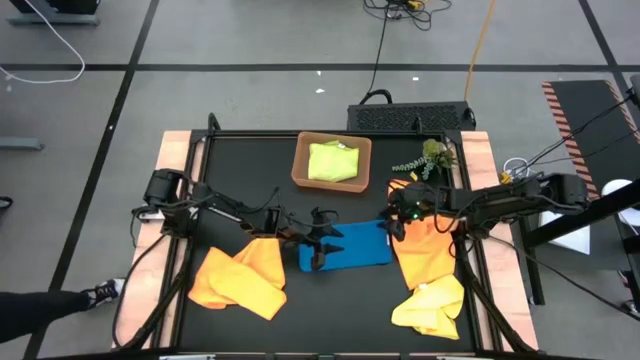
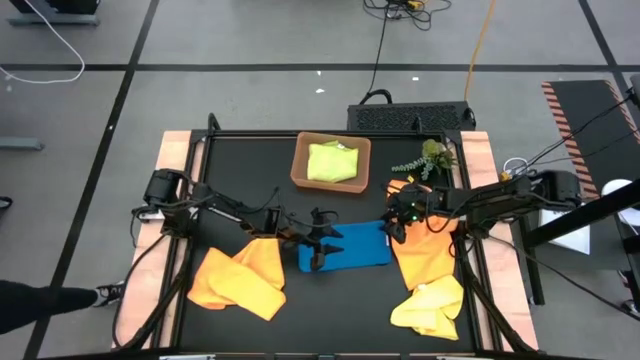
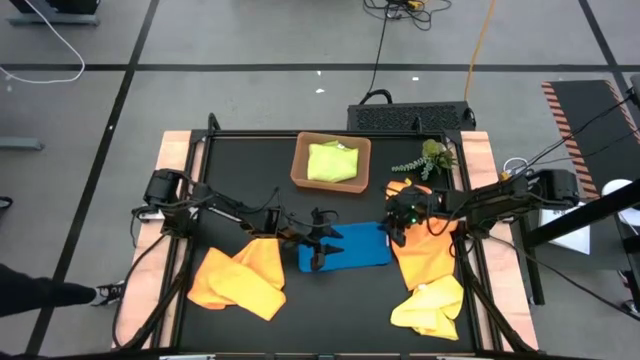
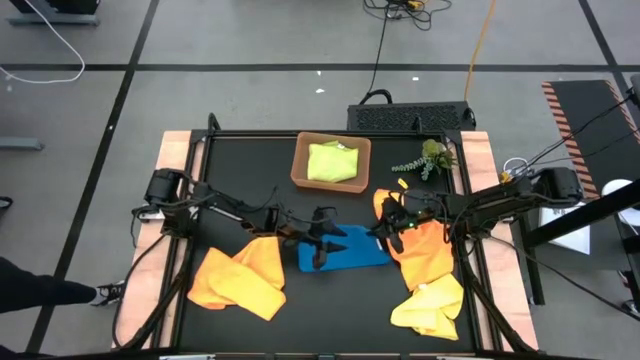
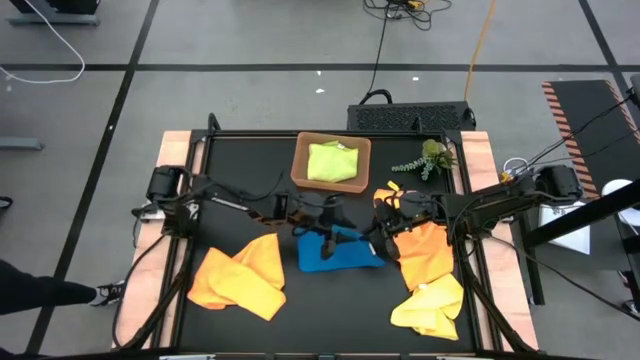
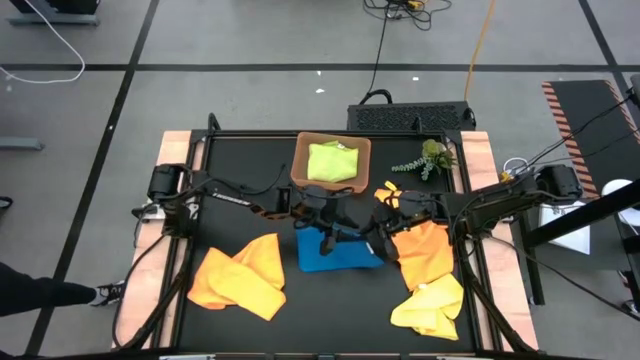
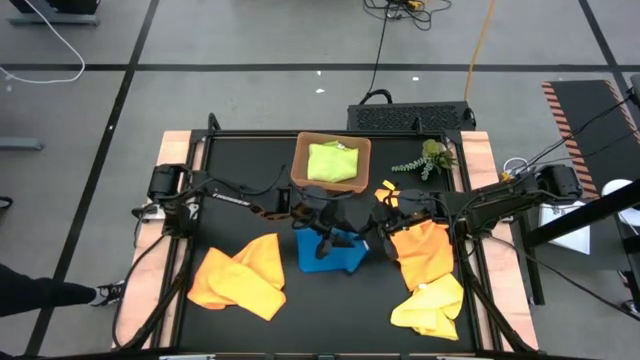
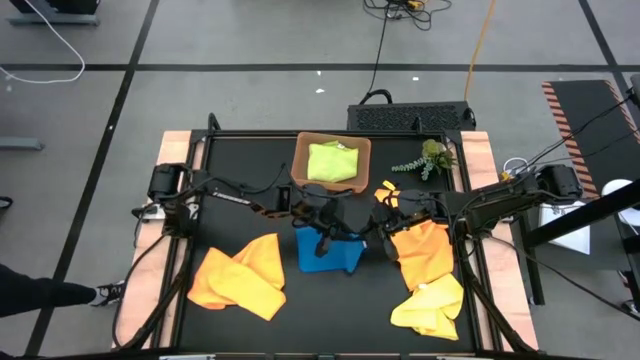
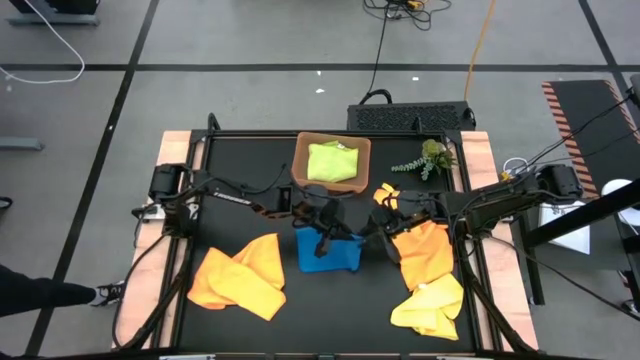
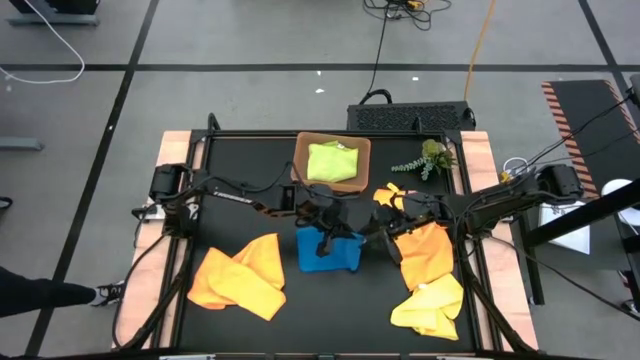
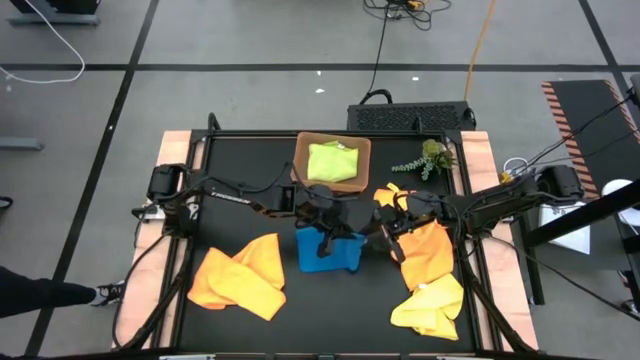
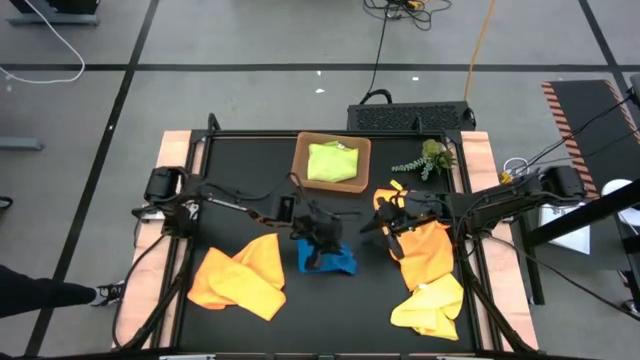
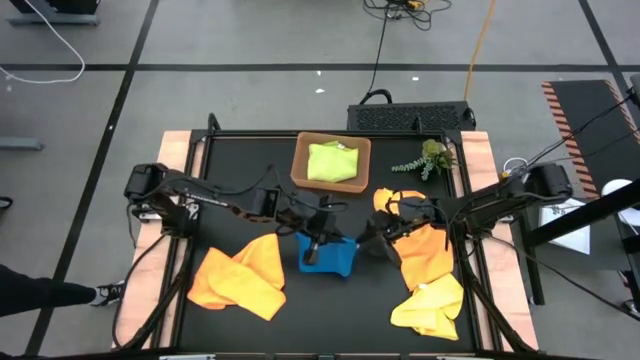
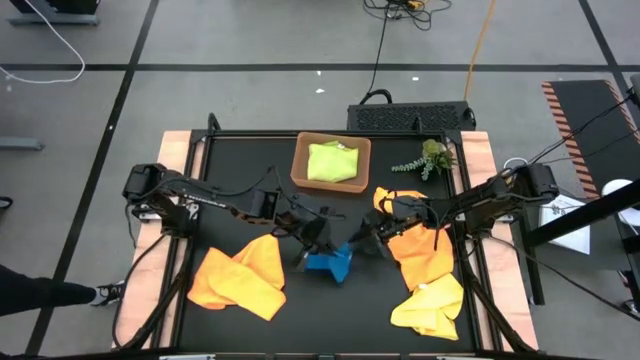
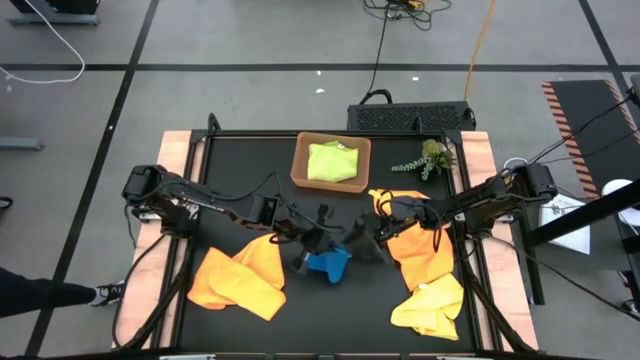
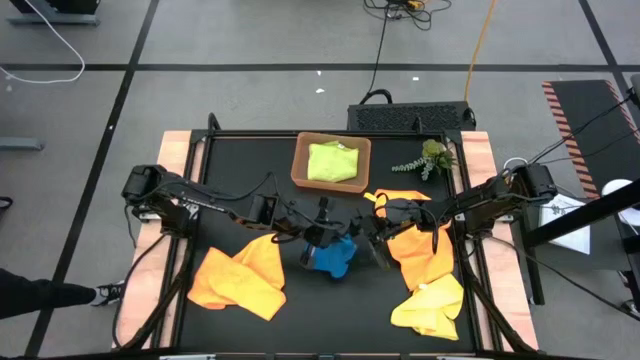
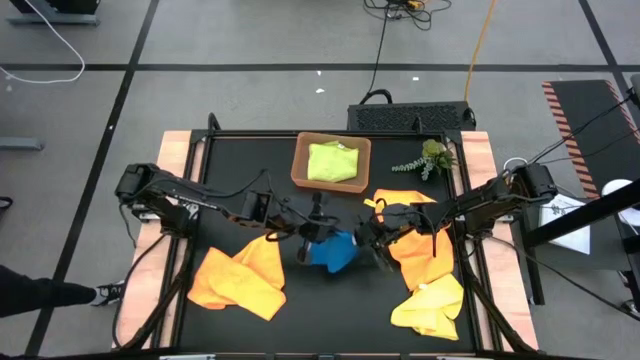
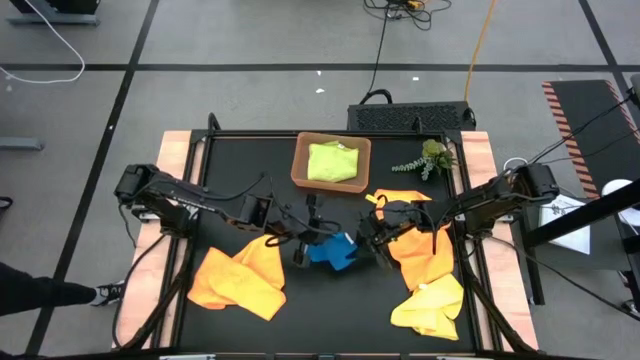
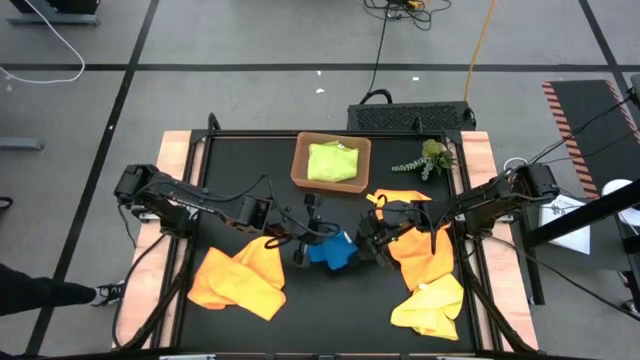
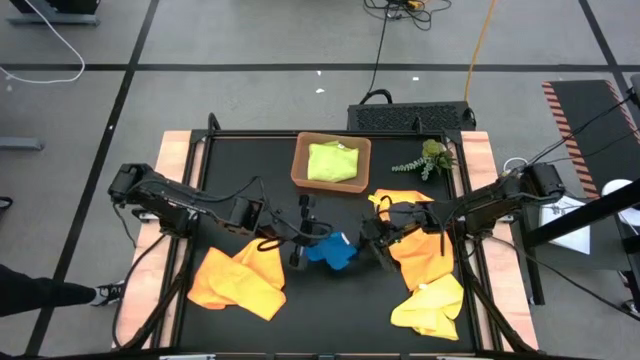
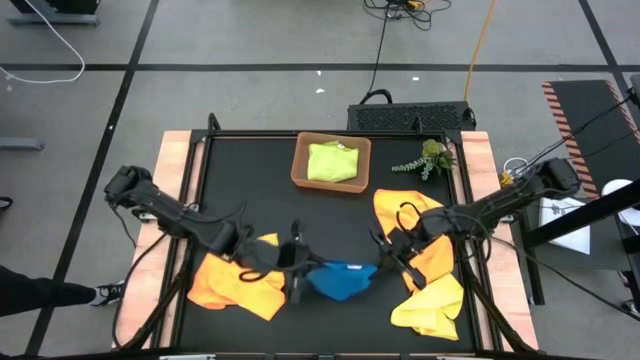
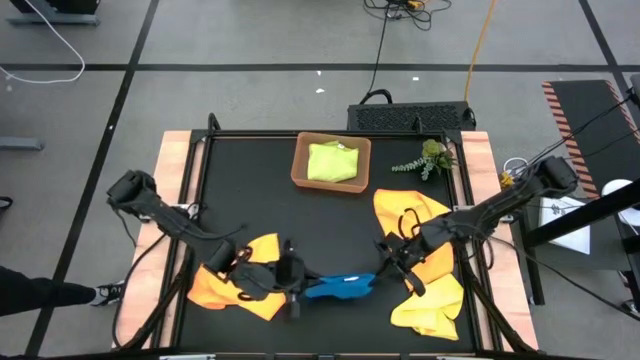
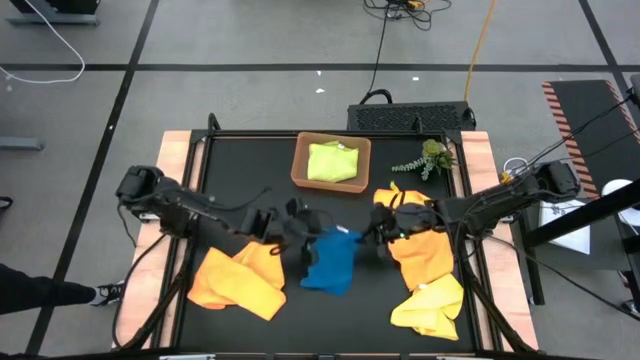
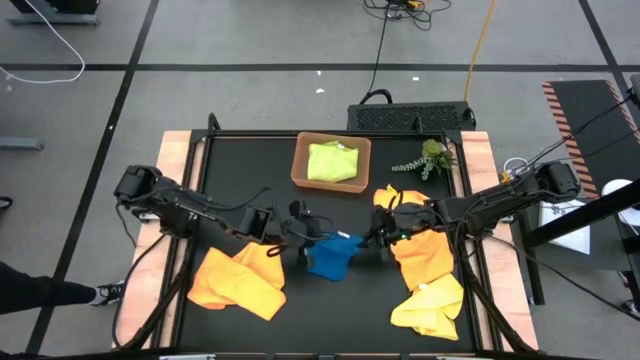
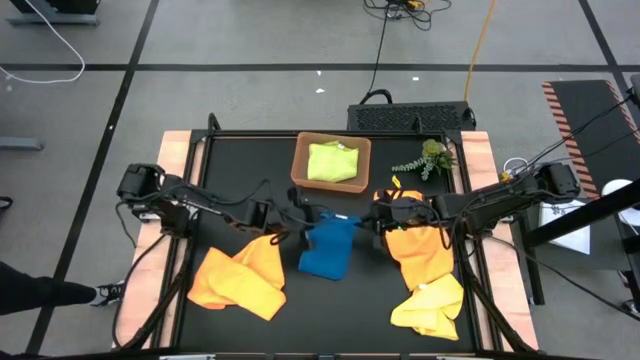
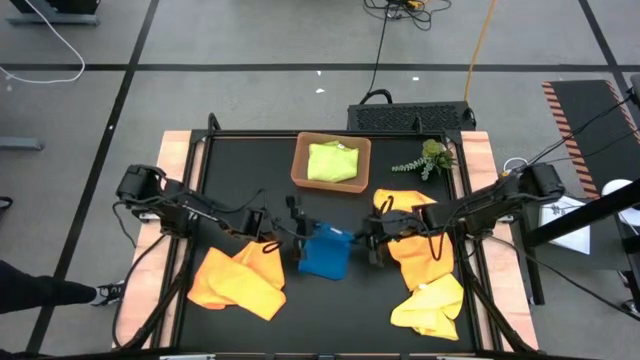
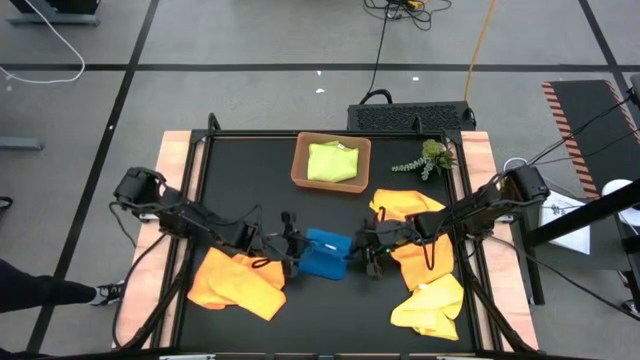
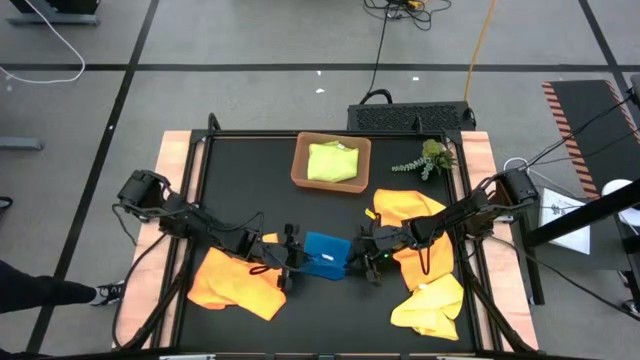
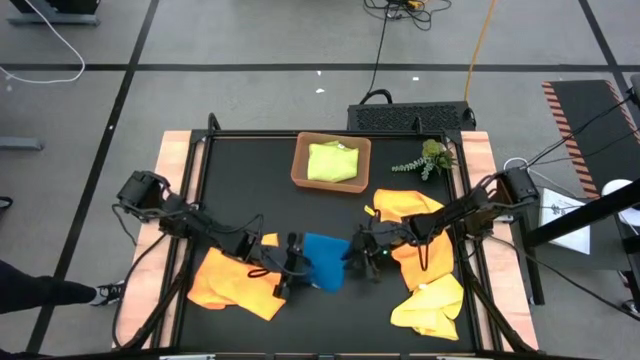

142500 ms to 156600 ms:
Task: Fold microfiber towels
Fold the blue microfiber towel

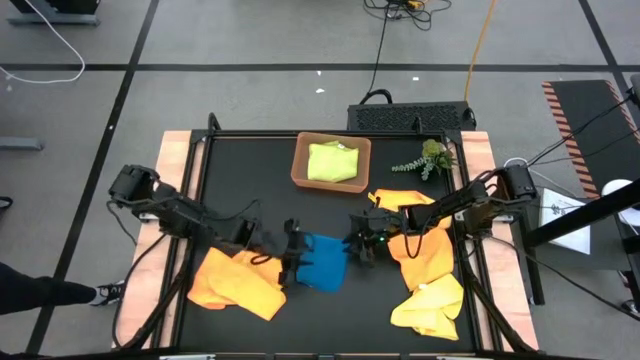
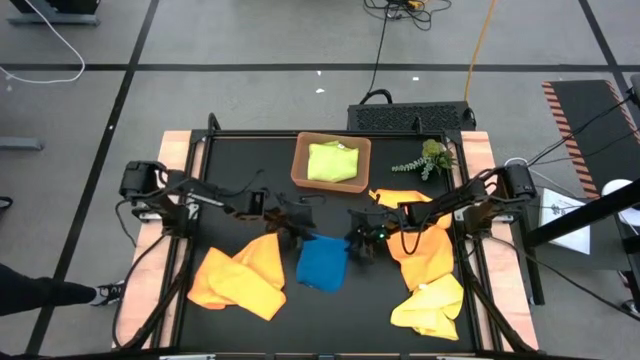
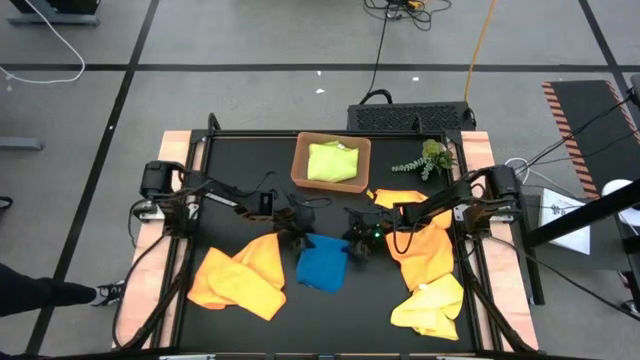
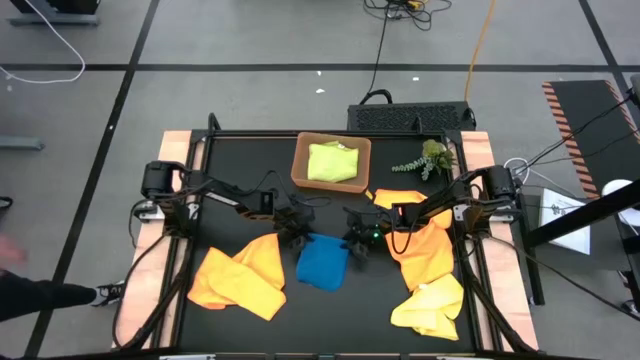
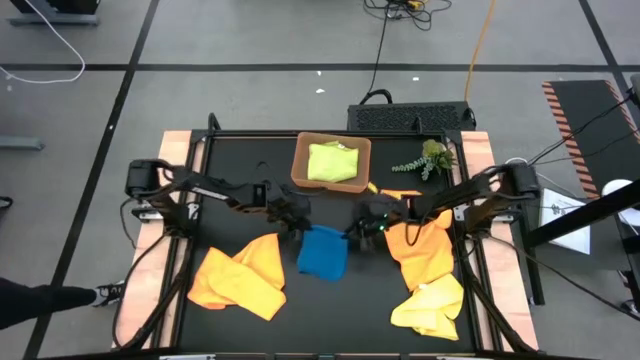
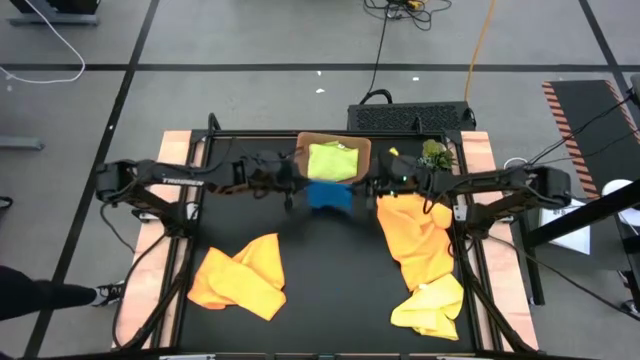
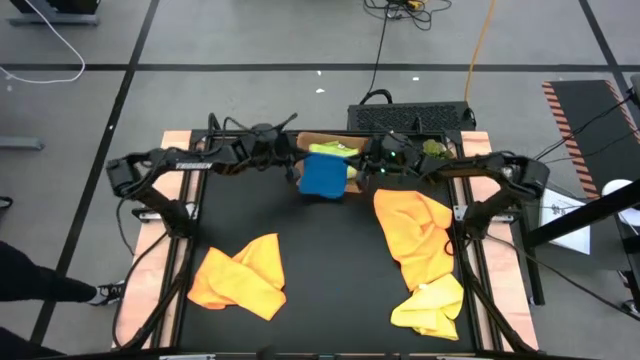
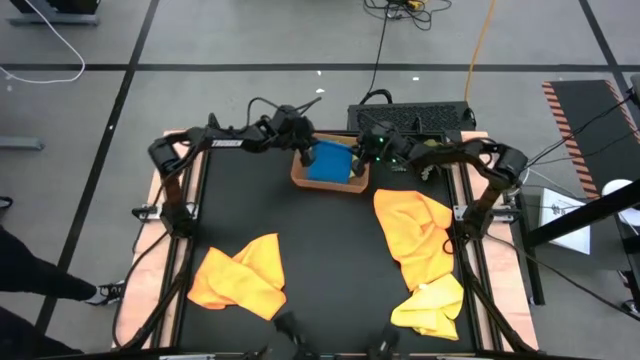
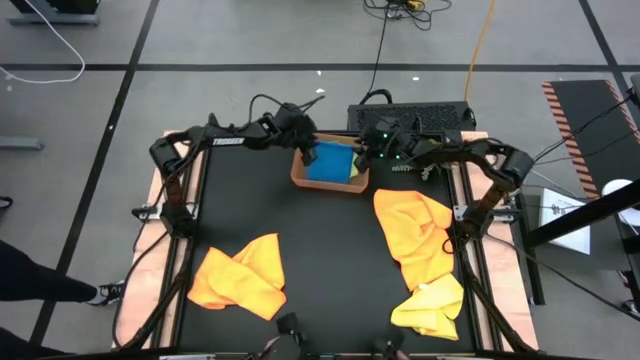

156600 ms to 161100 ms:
Put the blue microfiber towel into the orange bin

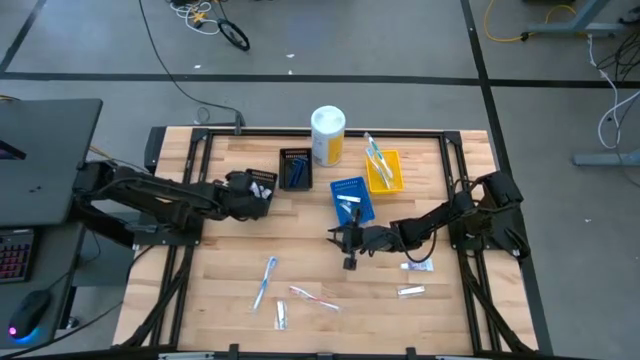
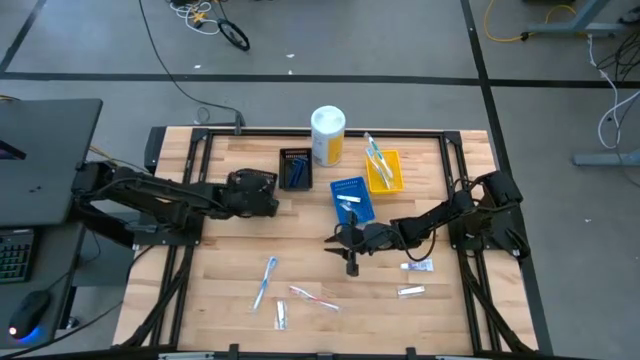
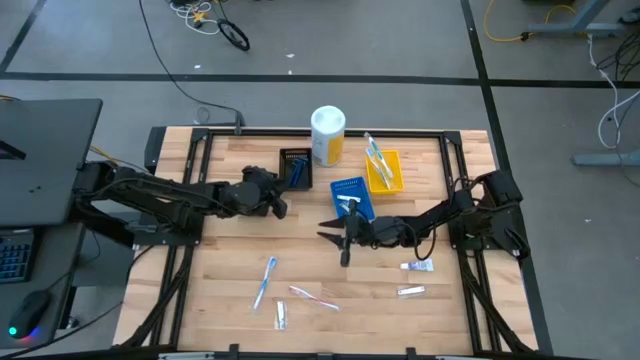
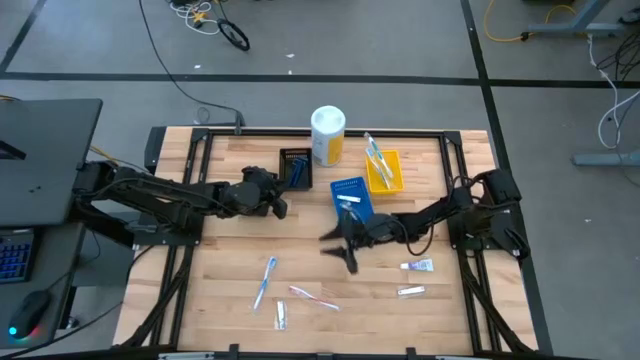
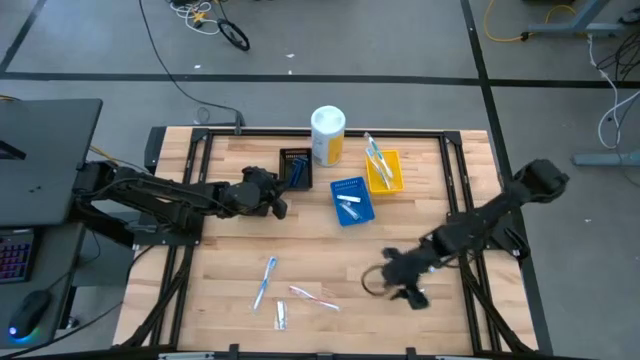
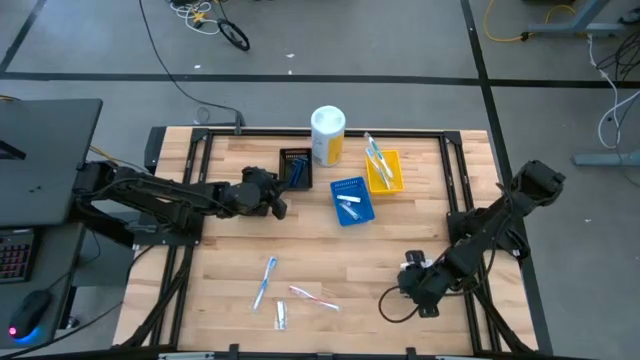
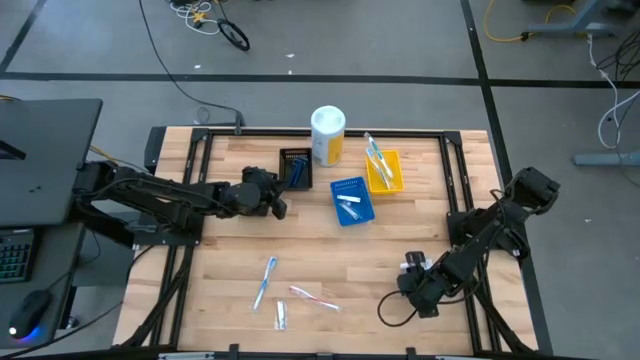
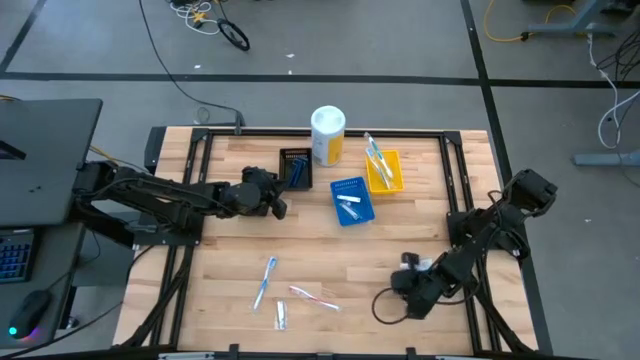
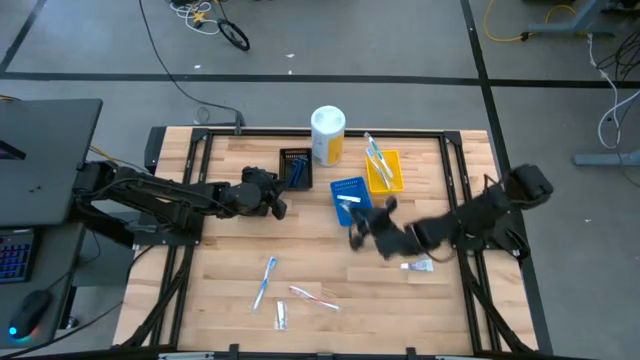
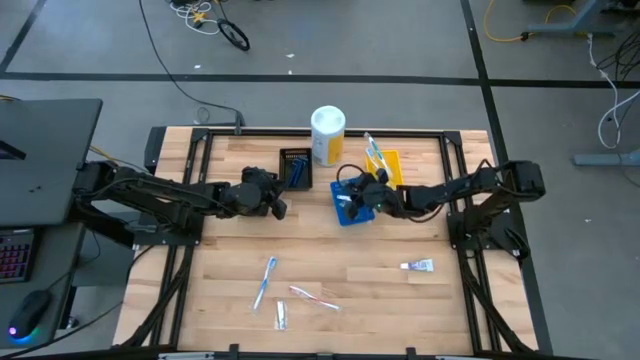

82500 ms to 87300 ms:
Task: Pick & Place Travel size toiletries
Put the silver nail cutter into the blue bin
